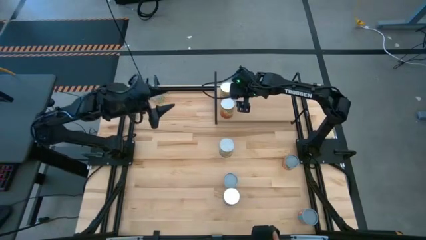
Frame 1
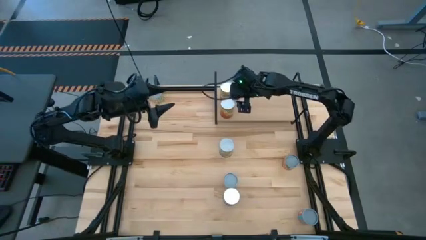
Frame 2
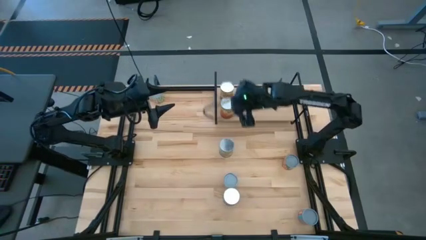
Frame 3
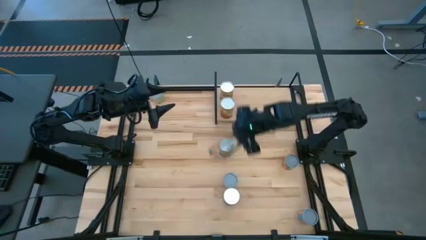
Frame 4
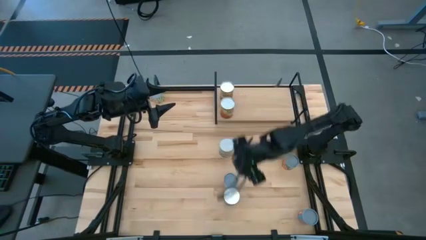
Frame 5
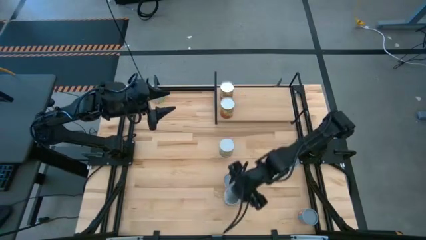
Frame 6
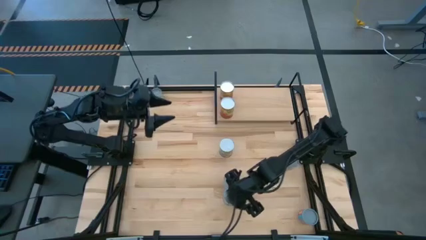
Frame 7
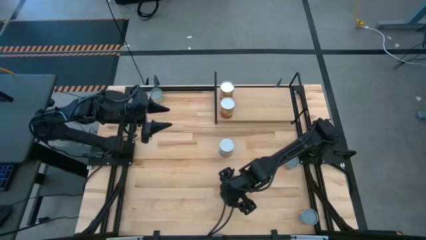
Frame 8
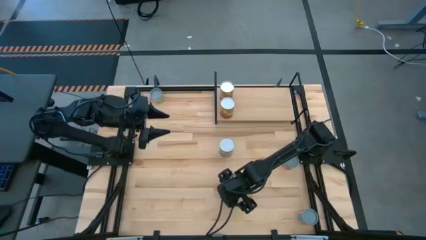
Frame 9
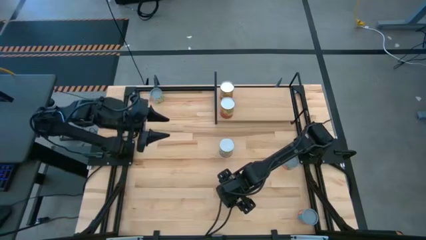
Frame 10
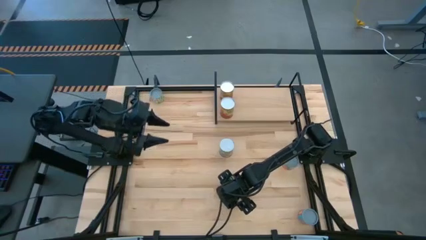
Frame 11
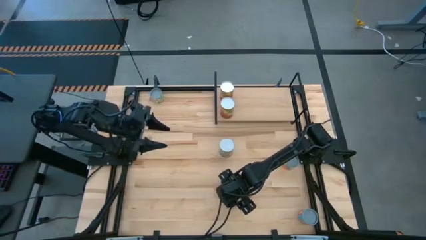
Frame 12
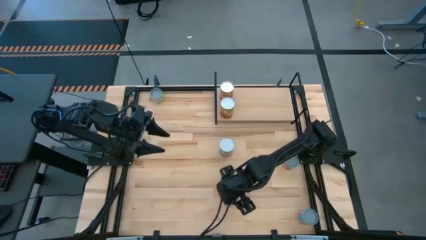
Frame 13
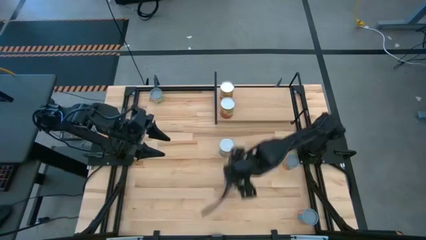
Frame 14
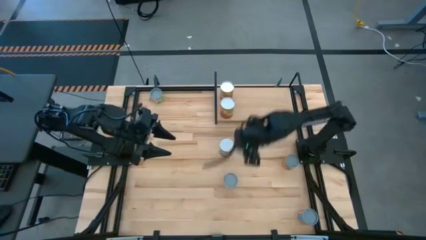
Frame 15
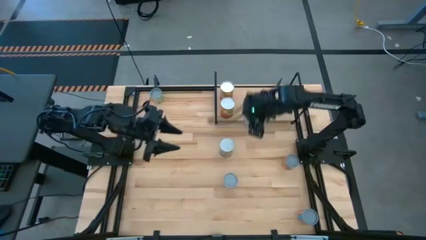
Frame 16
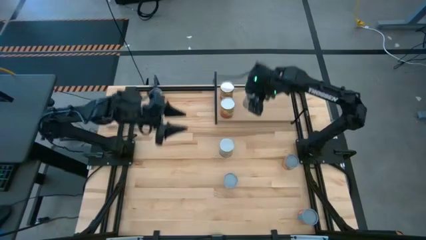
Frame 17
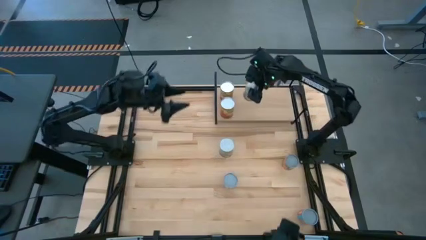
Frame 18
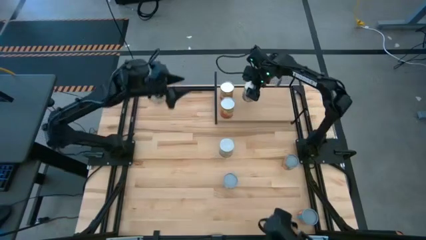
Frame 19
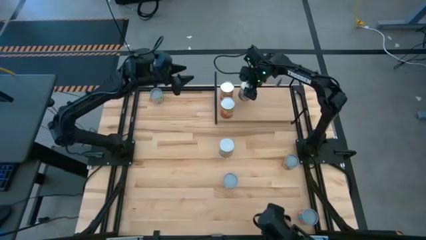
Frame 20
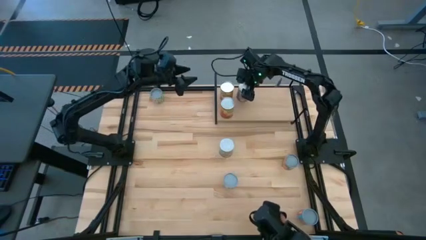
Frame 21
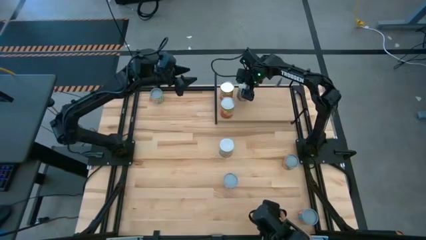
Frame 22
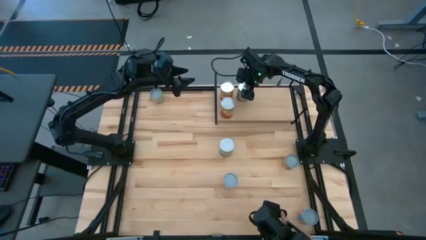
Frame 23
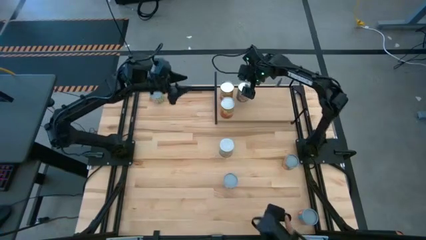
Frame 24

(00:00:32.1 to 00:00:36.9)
Task: Pick and place cans onto a shelf
Put the bottom canned peaches on the shelf

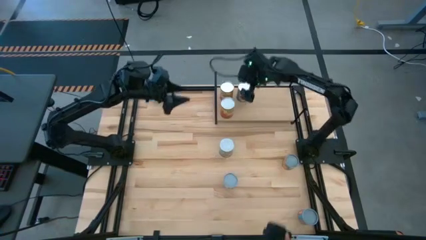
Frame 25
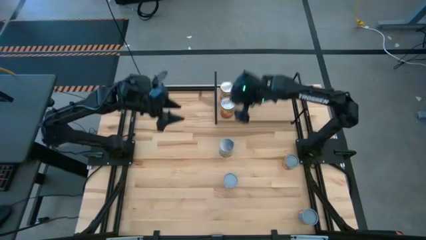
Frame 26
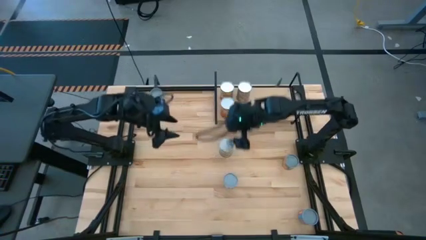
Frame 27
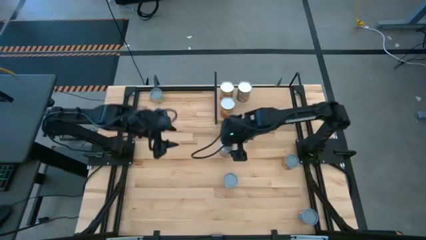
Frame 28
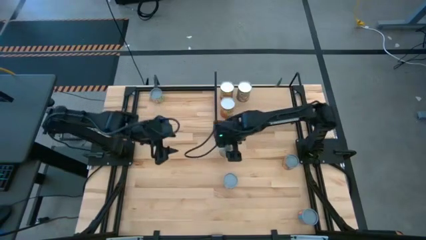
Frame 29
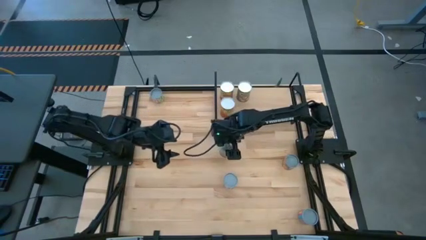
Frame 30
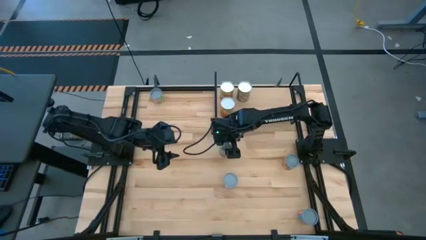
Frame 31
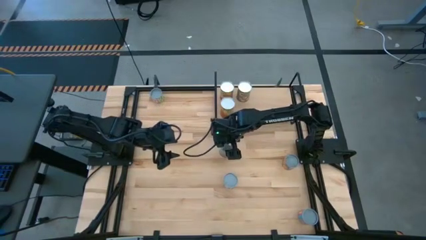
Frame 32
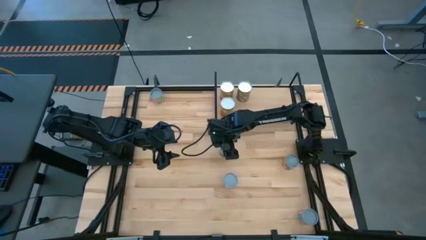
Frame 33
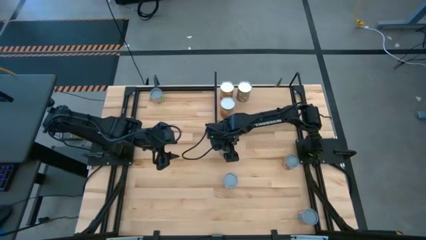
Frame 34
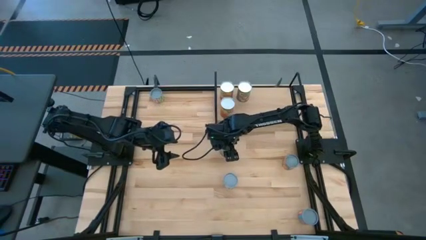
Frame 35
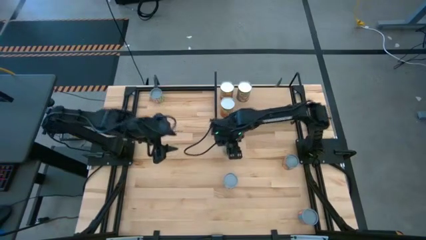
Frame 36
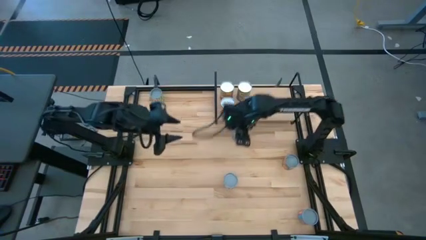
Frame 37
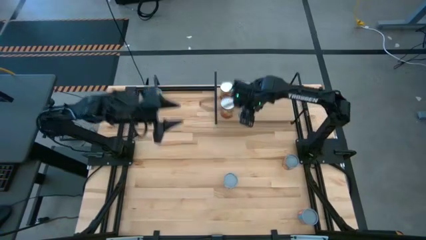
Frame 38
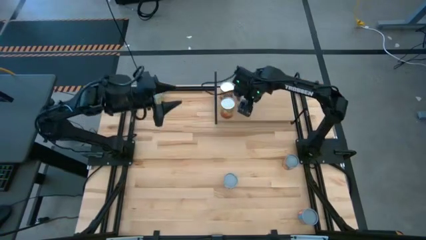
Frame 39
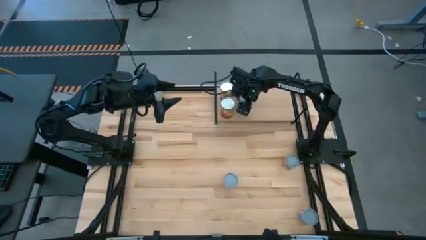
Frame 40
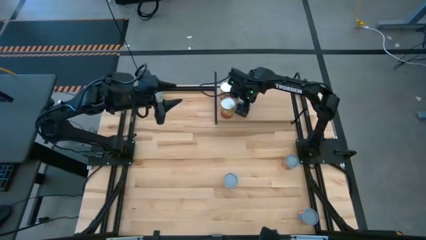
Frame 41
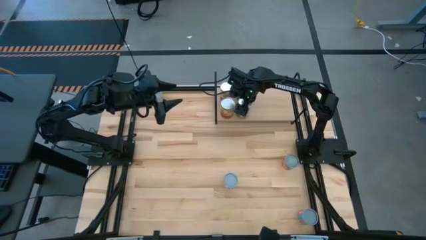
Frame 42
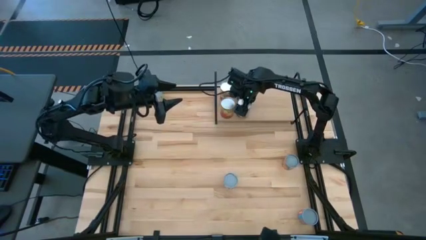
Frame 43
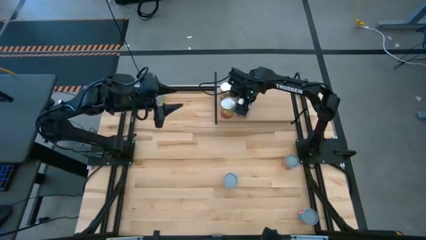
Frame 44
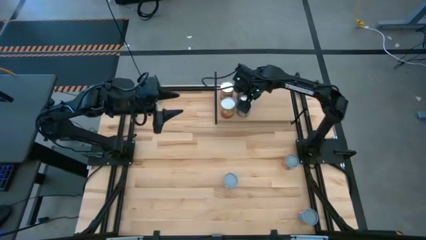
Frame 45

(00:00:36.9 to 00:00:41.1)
Put the canned peaches and aligned with the other canned peaches on the shelf

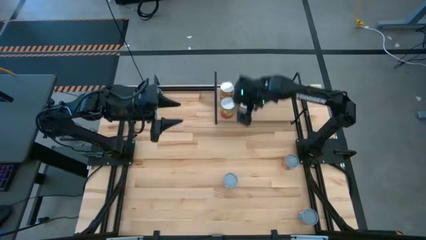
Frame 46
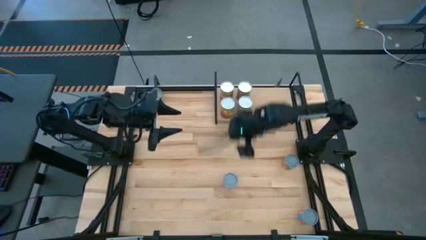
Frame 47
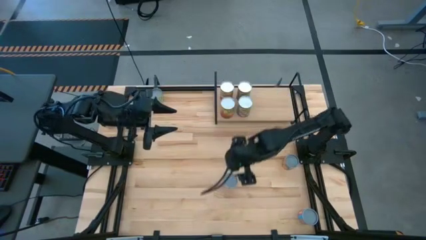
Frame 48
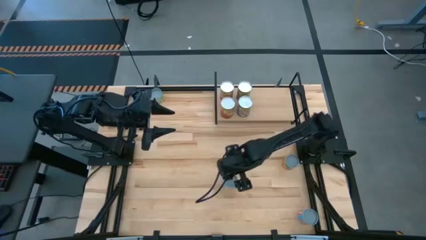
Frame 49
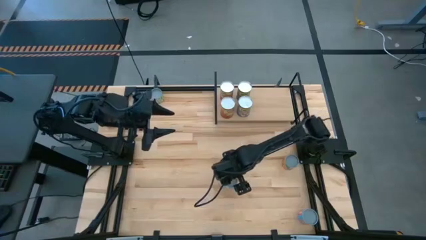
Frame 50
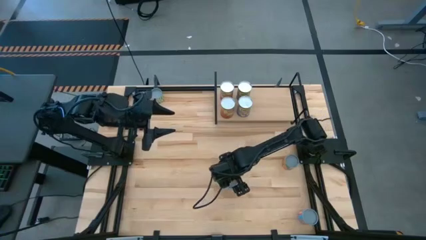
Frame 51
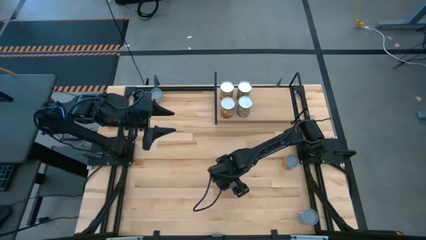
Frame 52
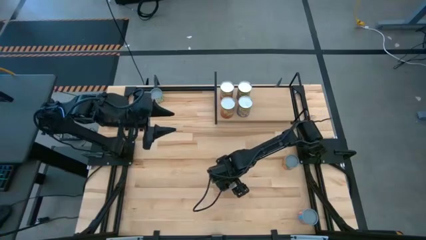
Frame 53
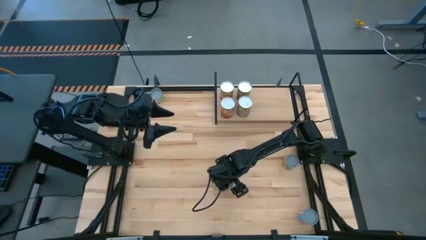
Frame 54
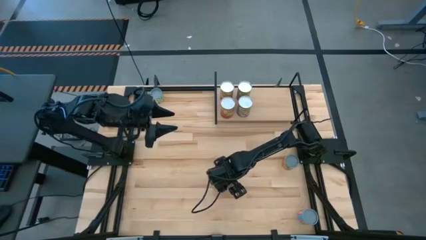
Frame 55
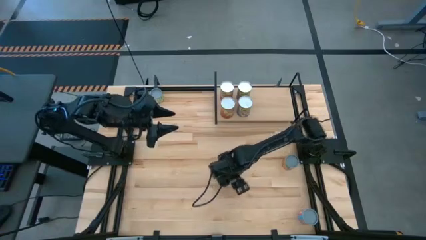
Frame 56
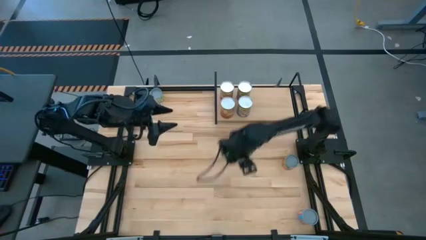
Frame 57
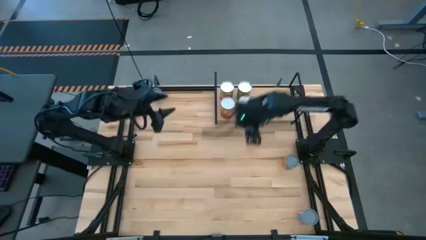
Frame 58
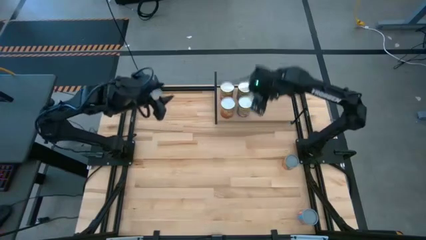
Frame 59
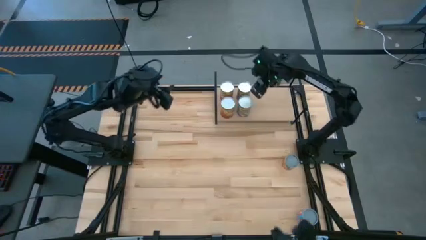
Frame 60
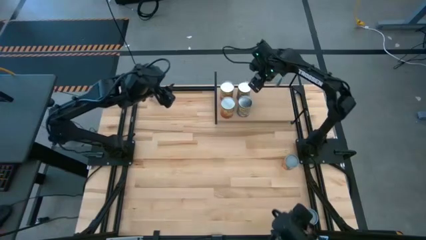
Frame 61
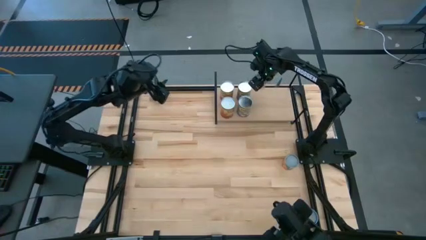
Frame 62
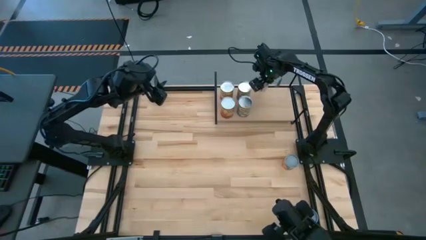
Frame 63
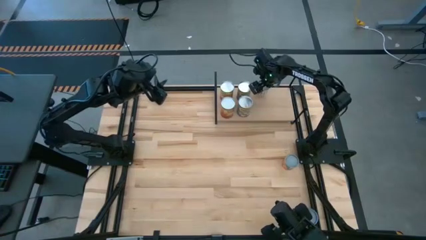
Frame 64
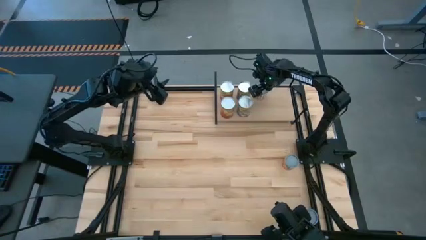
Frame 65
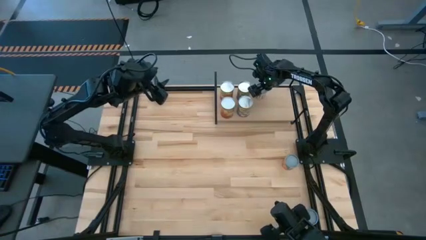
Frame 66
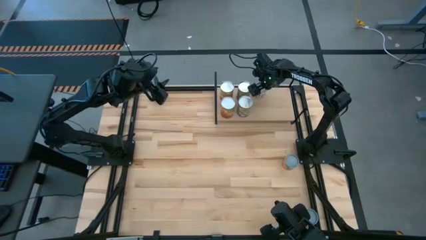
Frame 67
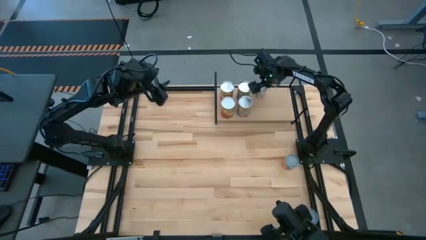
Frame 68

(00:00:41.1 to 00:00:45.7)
Put the canned carrots on the shelf
